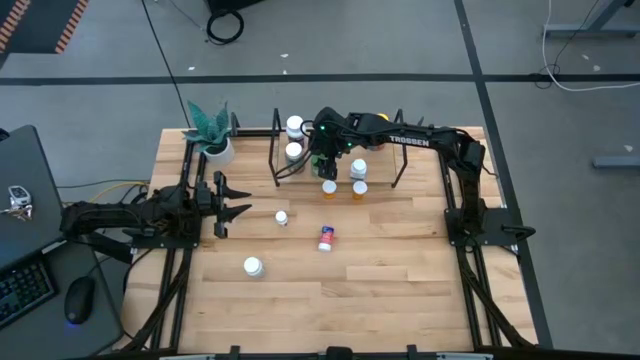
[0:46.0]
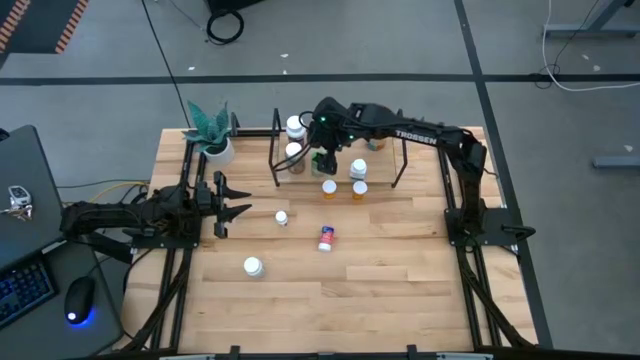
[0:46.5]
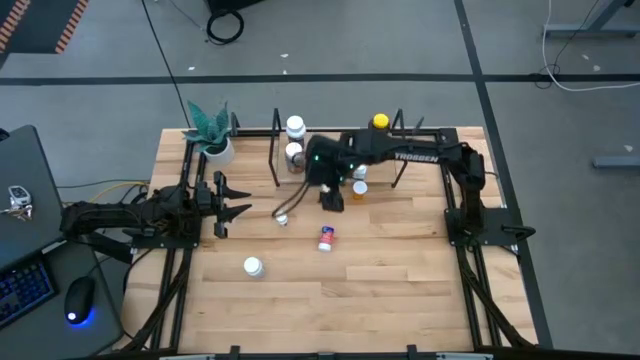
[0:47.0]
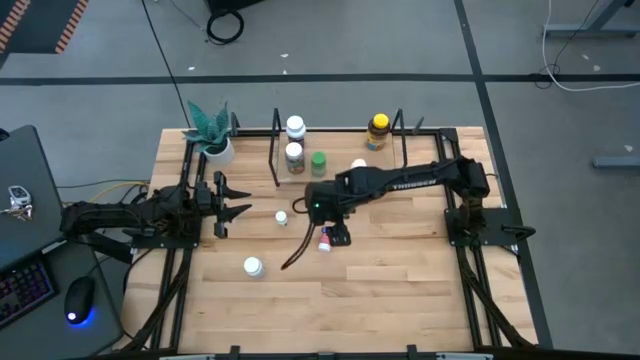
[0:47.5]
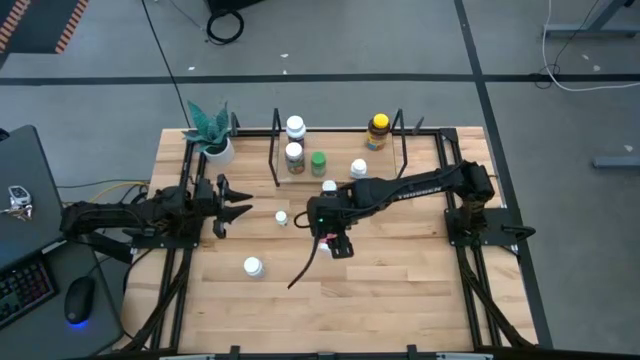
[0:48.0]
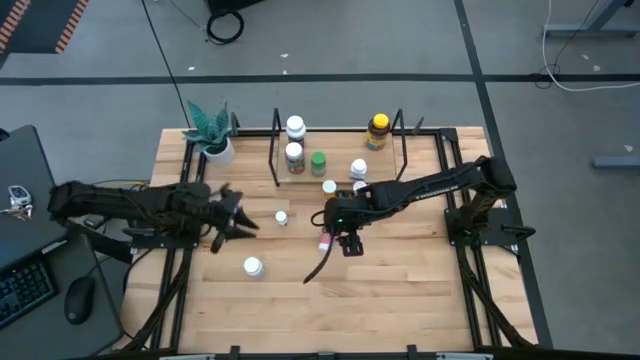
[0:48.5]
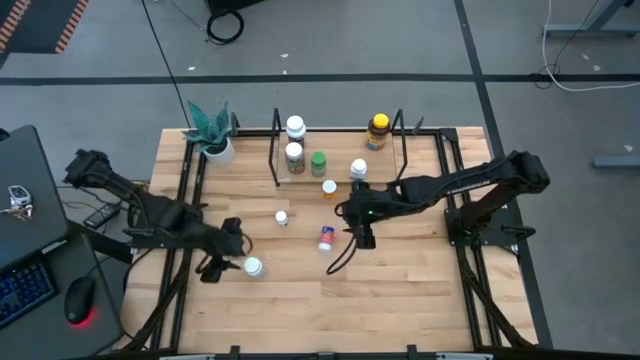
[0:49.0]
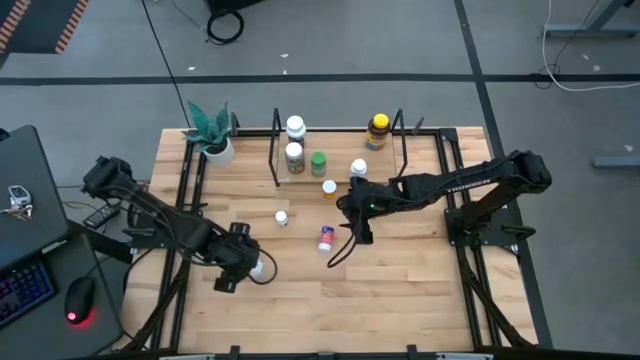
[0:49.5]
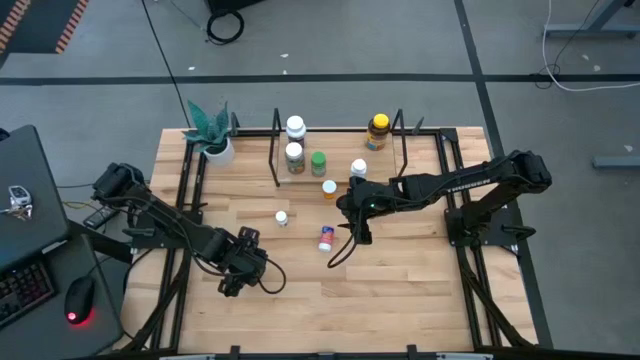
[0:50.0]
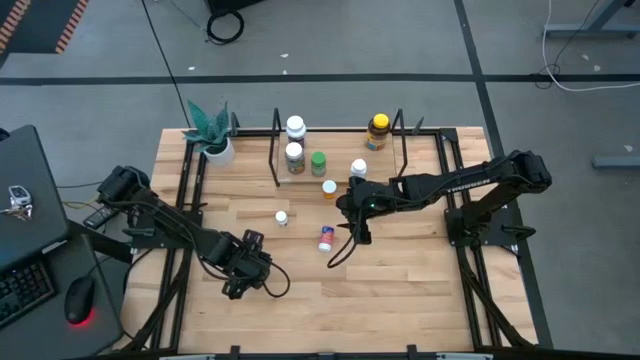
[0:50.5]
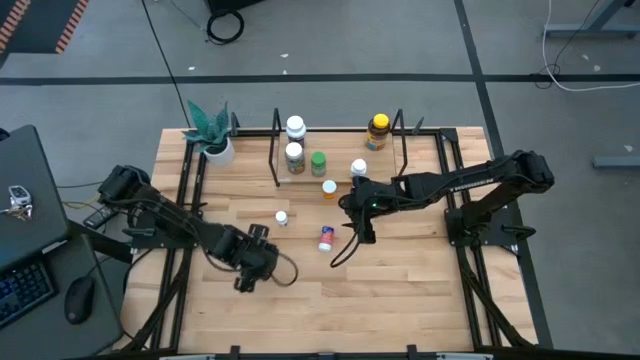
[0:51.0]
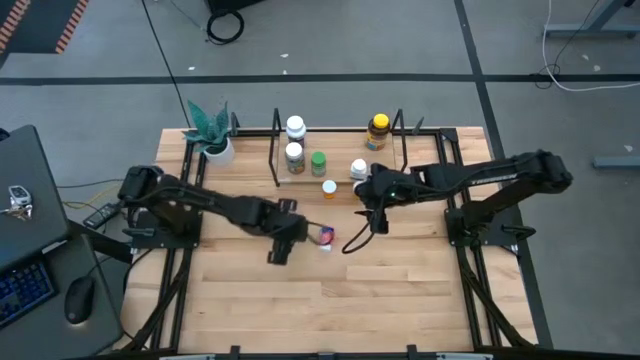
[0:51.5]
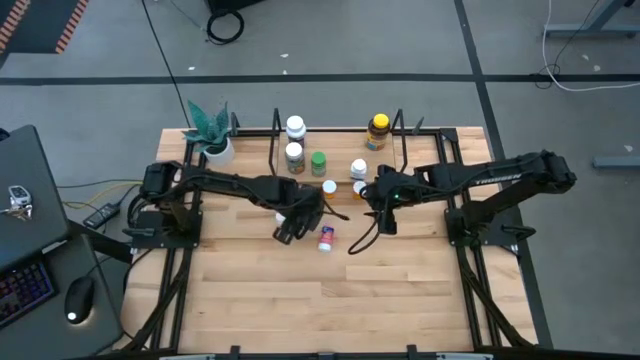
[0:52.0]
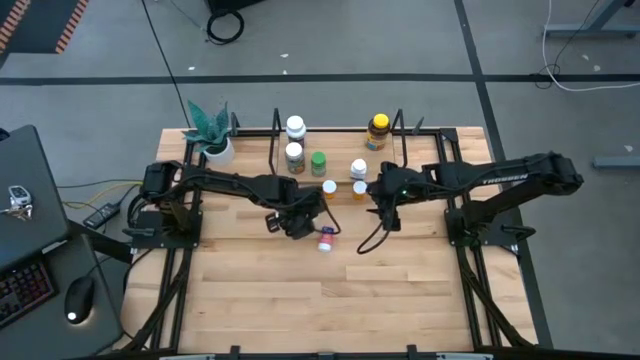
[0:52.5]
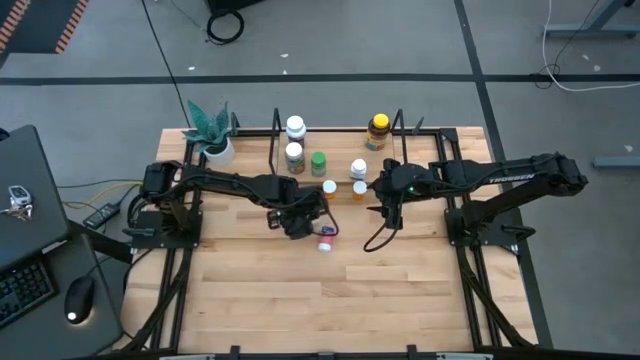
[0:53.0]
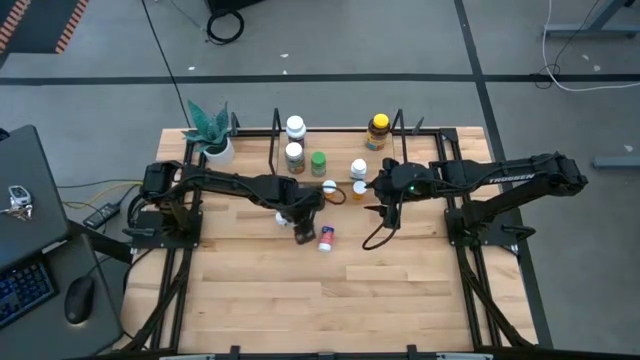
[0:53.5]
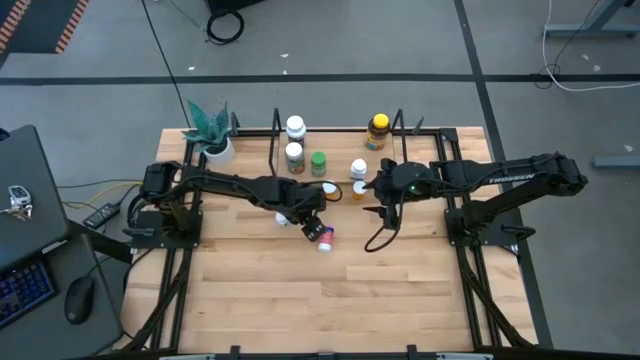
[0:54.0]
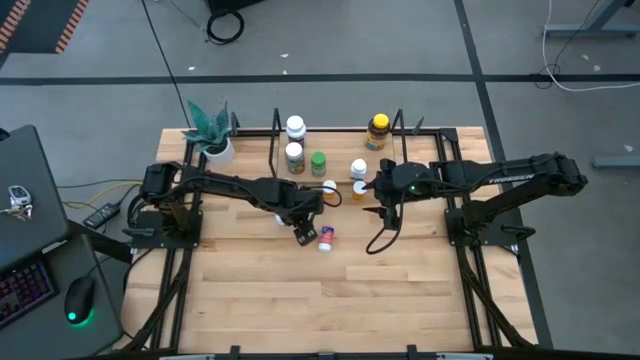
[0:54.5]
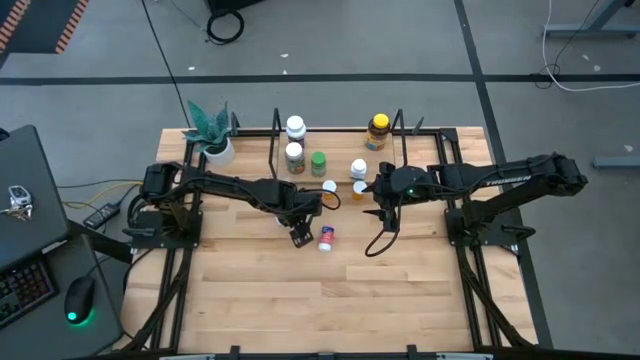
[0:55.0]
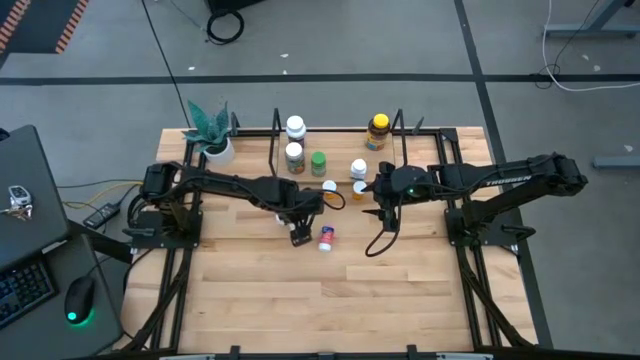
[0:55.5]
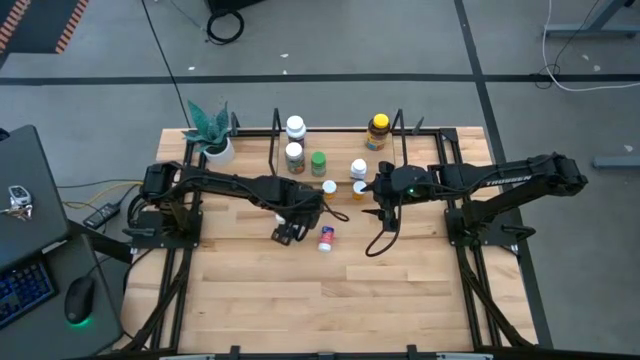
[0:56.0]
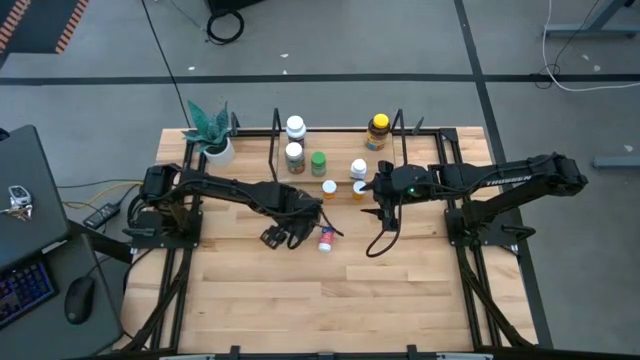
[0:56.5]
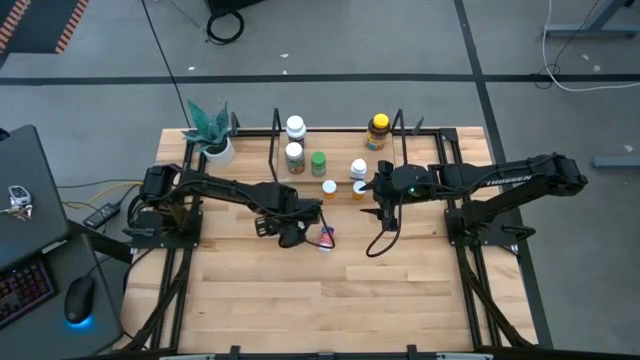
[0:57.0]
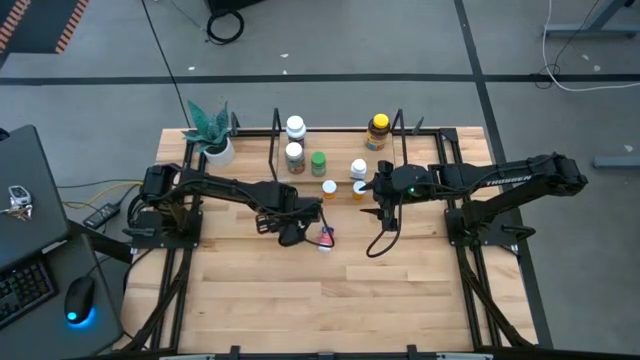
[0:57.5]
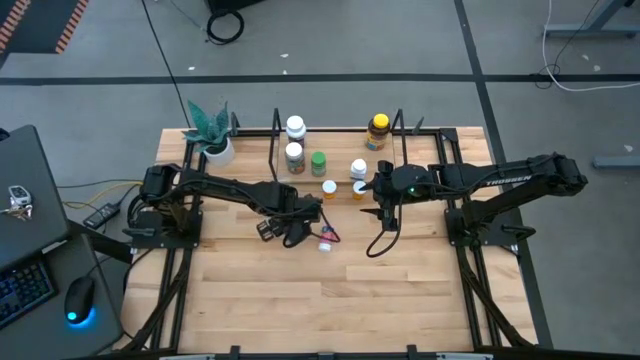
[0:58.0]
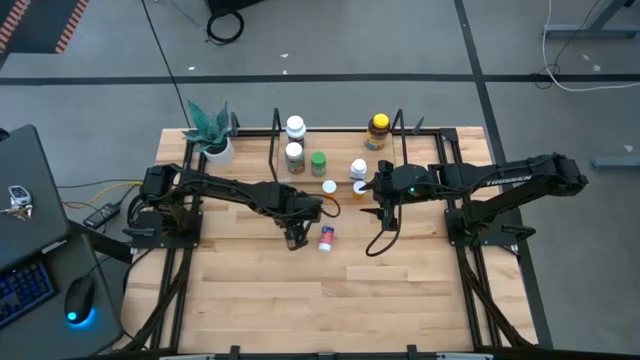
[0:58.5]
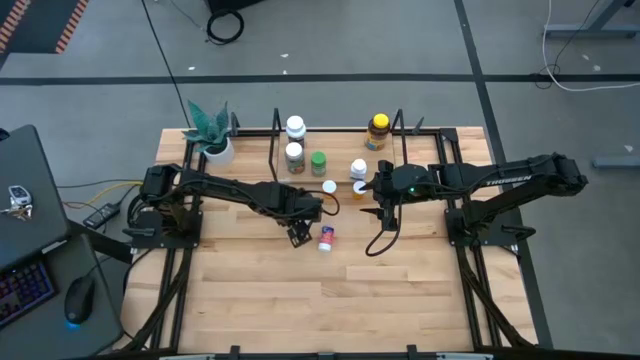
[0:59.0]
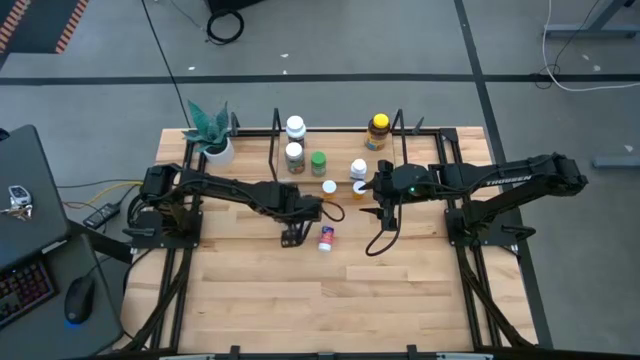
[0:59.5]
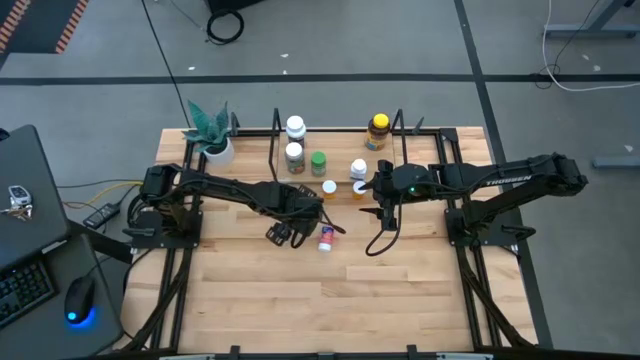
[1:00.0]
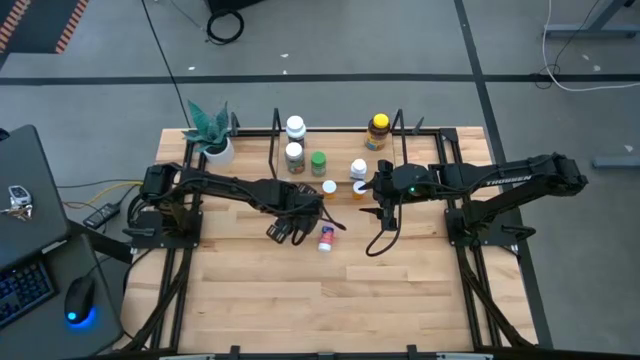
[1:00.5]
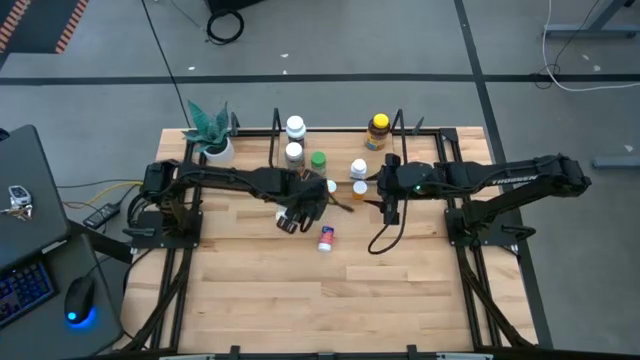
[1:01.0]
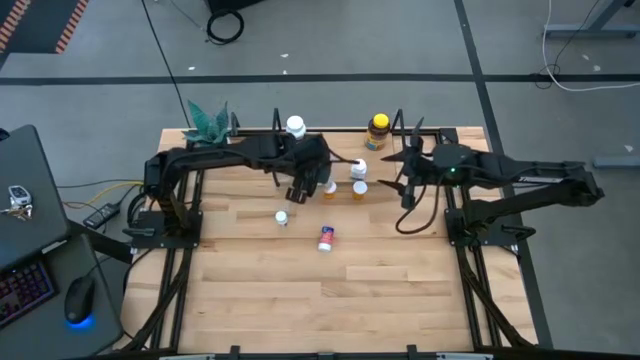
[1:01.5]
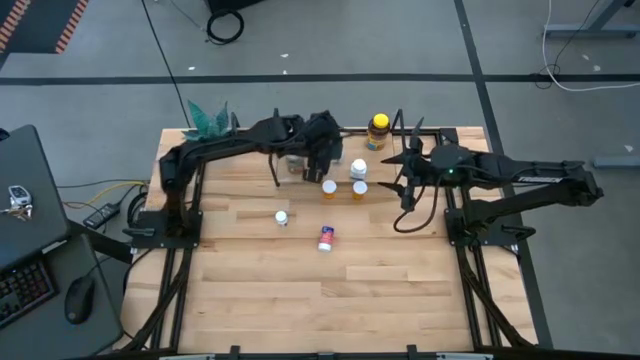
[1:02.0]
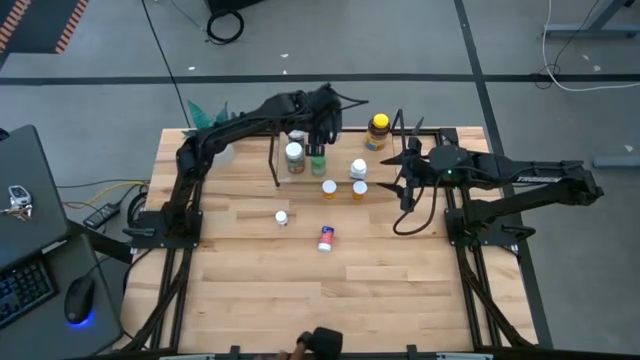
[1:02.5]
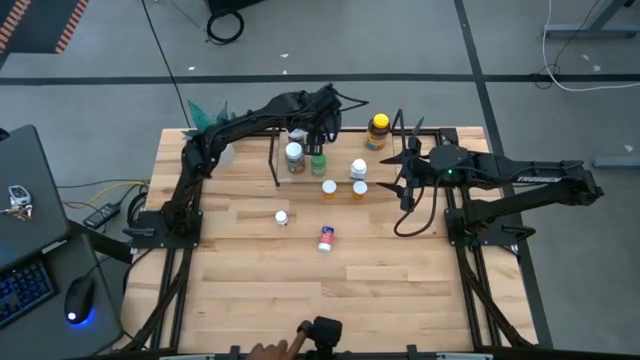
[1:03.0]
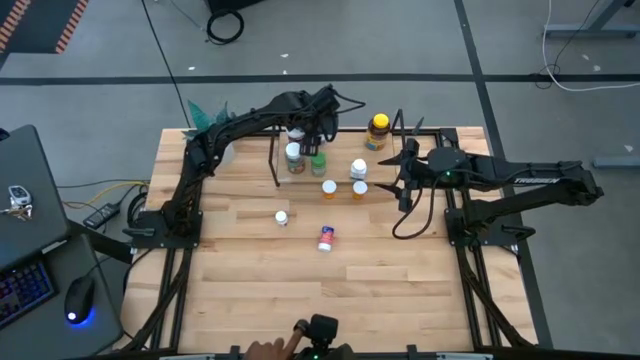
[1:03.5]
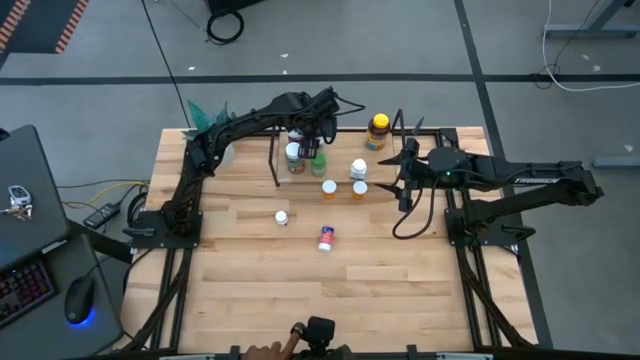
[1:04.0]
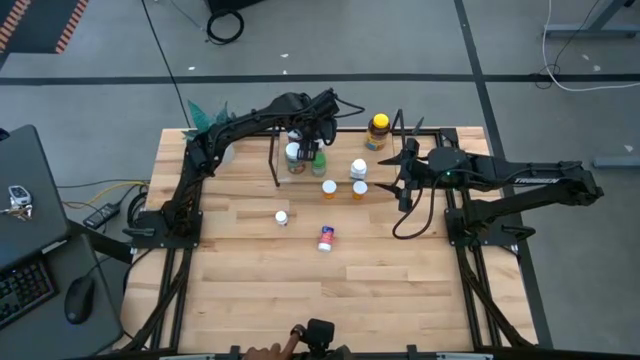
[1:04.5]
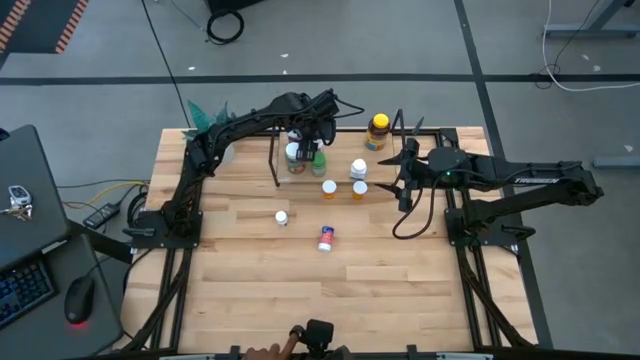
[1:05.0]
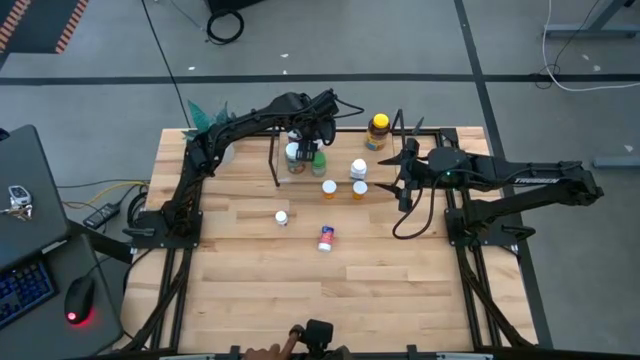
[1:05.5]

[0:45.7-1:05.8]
Task: Pick and place medicine bottles onto shelf by color
Put the medium white pill bottle on the shelf
